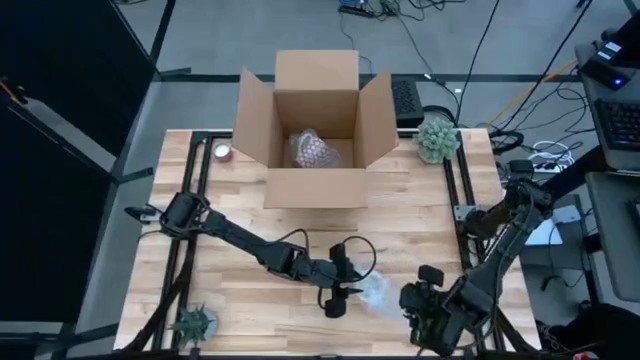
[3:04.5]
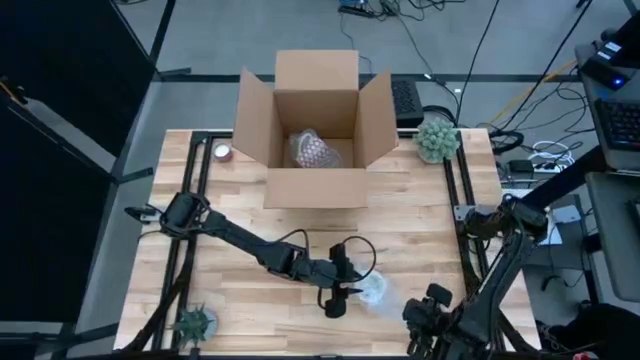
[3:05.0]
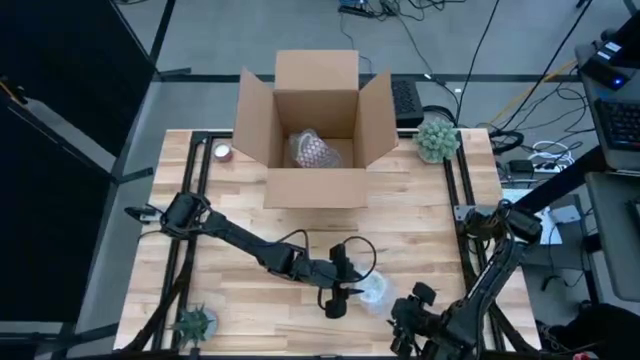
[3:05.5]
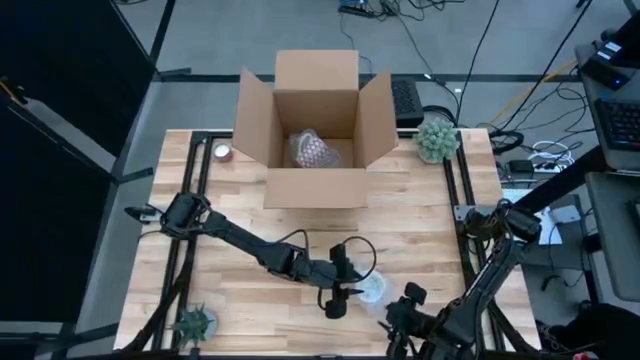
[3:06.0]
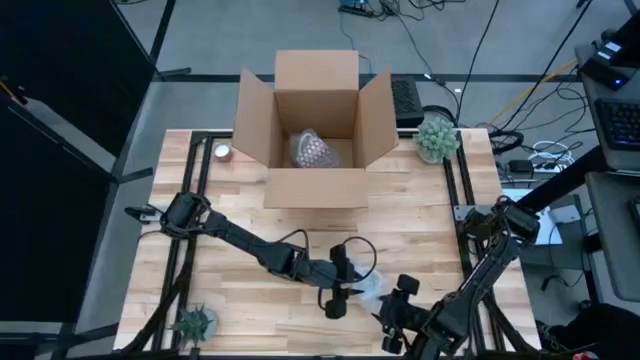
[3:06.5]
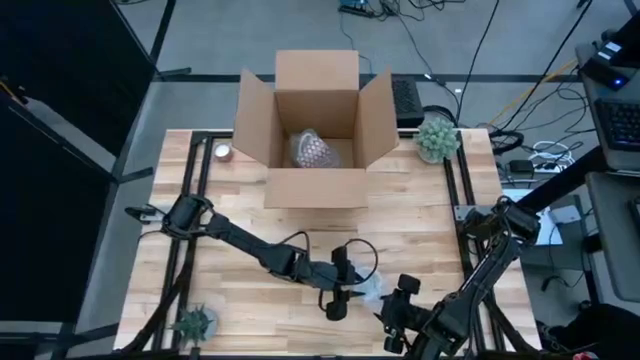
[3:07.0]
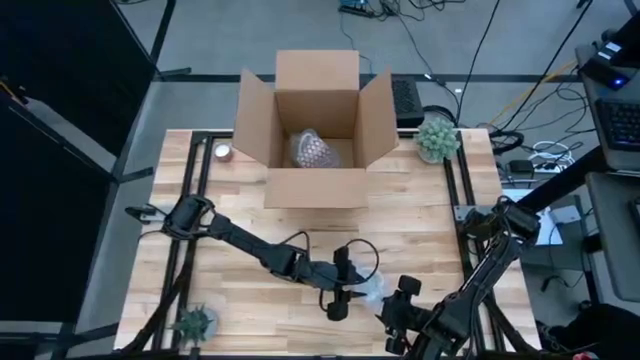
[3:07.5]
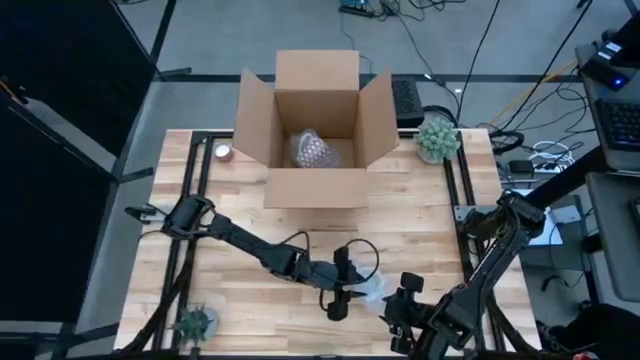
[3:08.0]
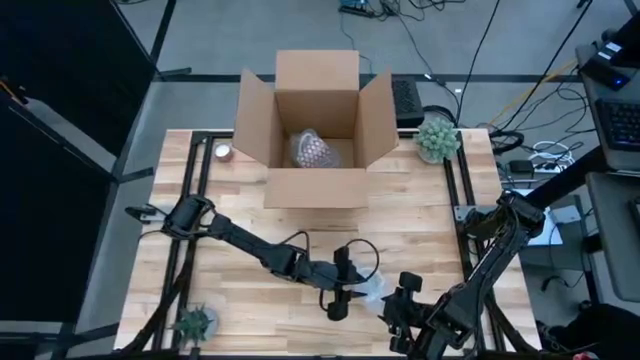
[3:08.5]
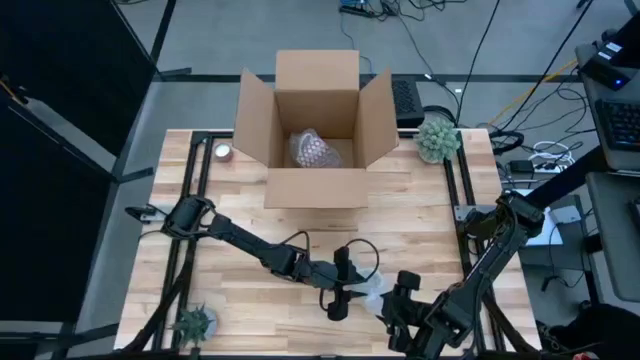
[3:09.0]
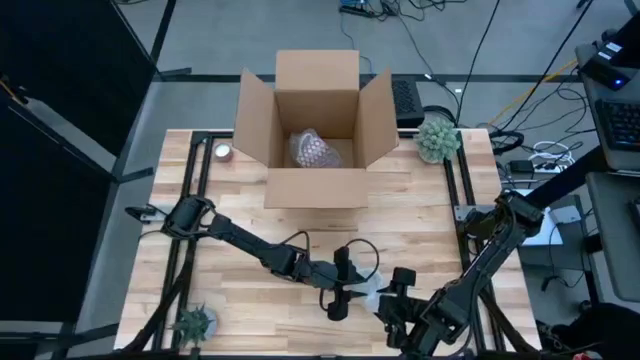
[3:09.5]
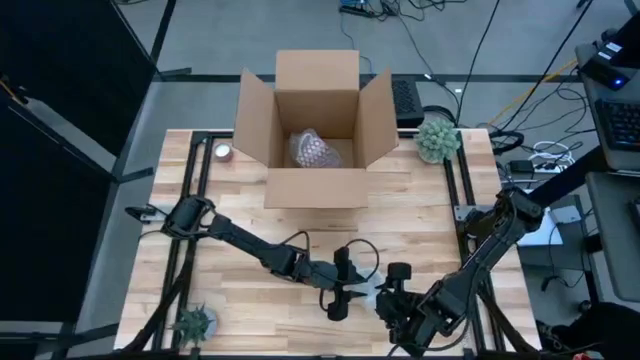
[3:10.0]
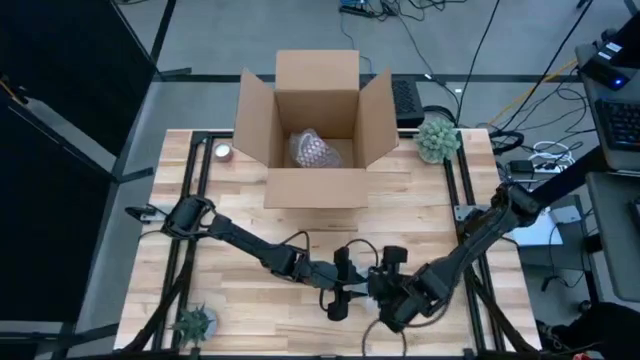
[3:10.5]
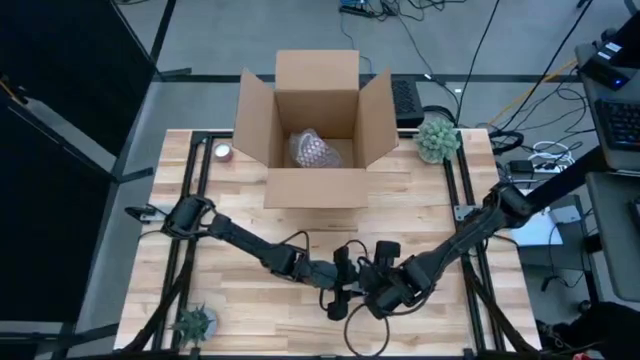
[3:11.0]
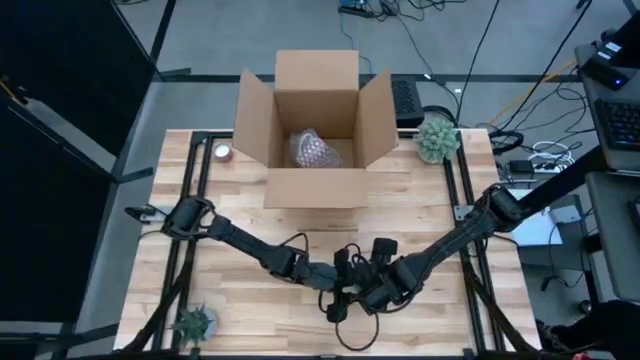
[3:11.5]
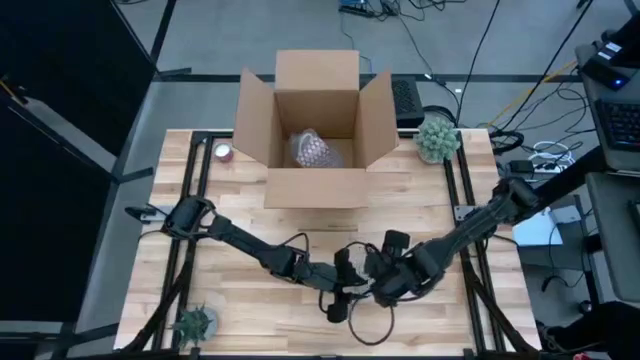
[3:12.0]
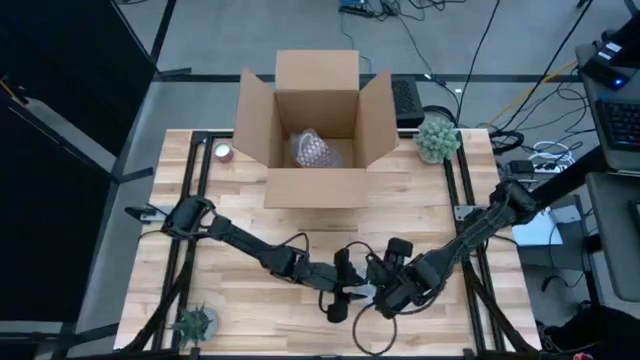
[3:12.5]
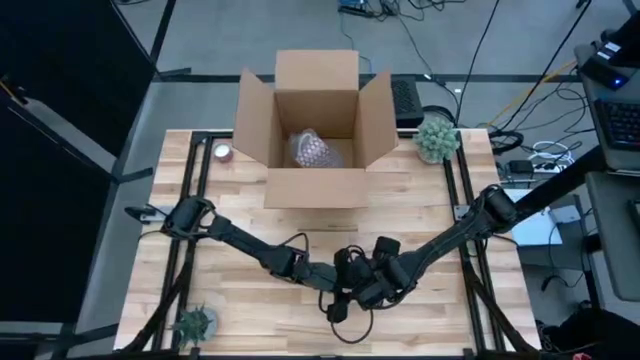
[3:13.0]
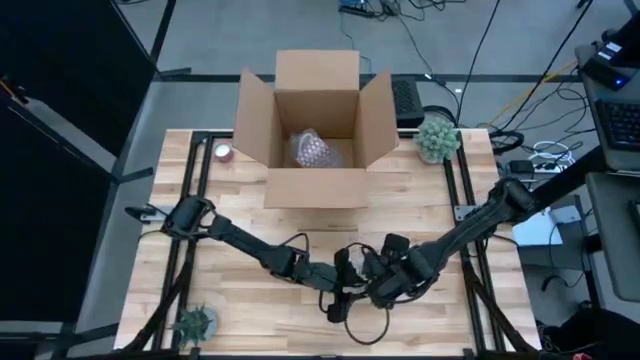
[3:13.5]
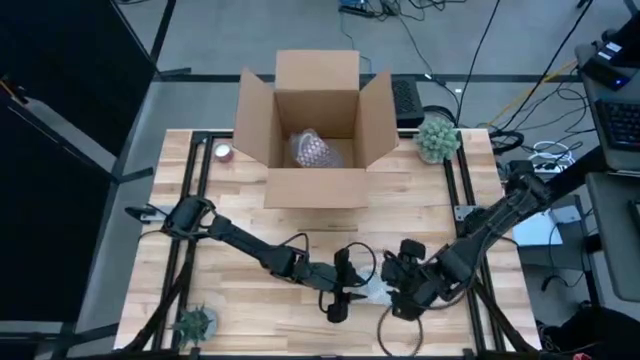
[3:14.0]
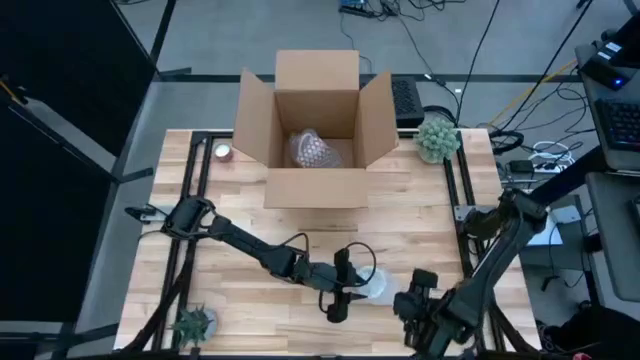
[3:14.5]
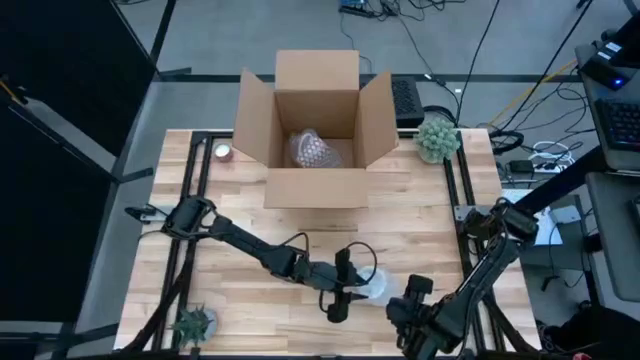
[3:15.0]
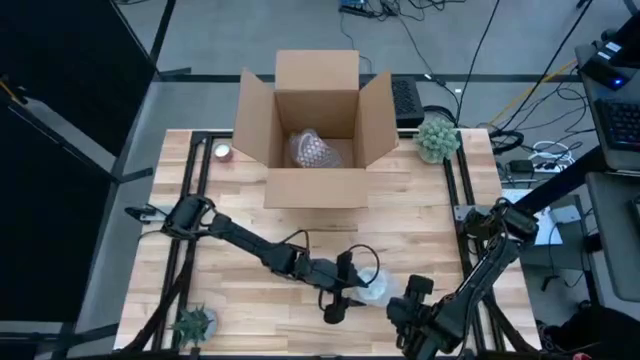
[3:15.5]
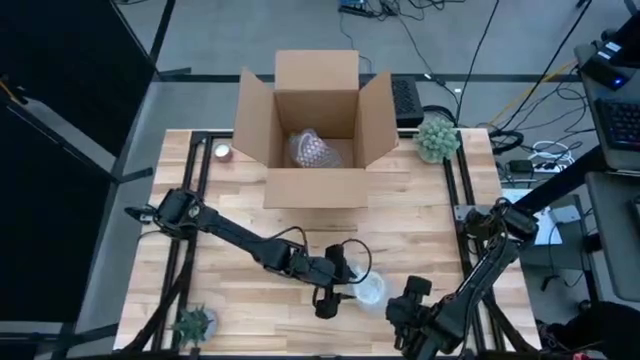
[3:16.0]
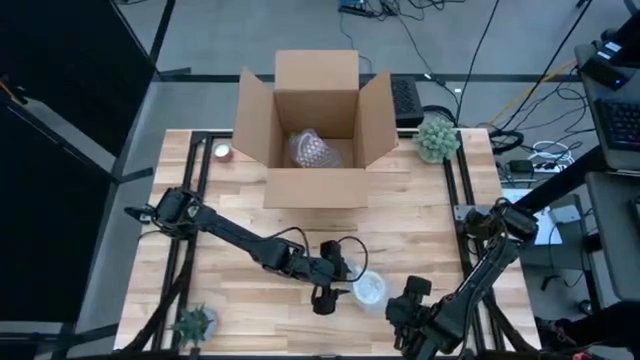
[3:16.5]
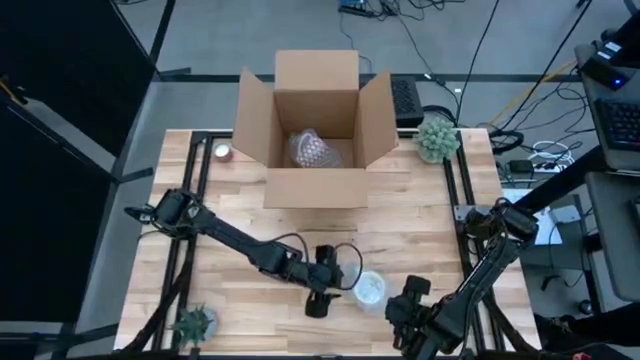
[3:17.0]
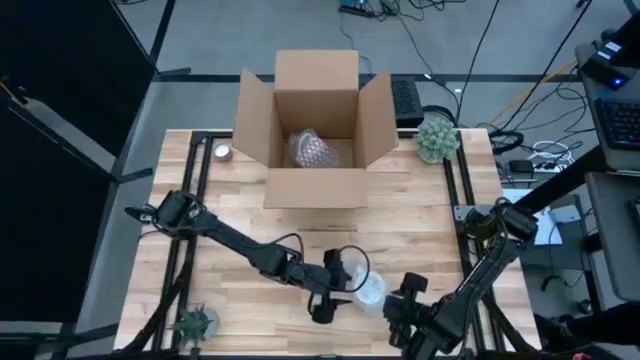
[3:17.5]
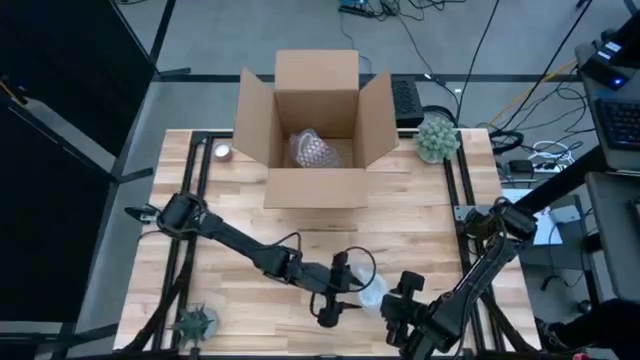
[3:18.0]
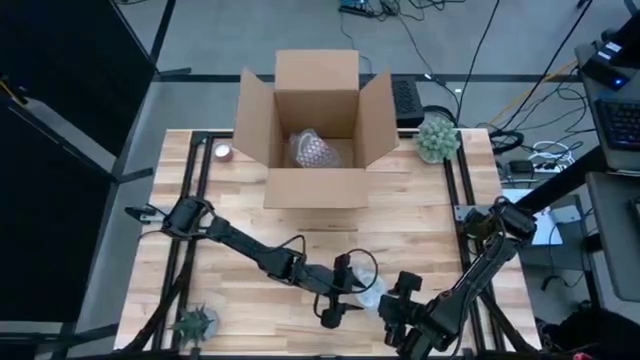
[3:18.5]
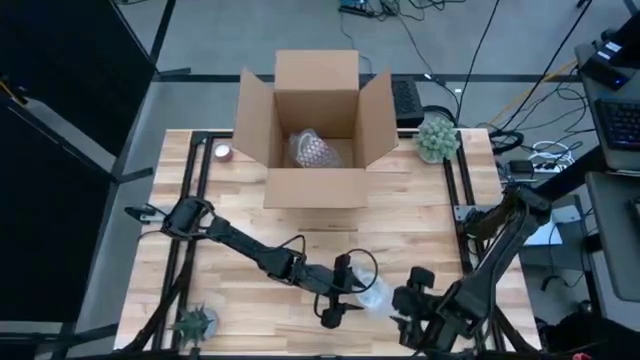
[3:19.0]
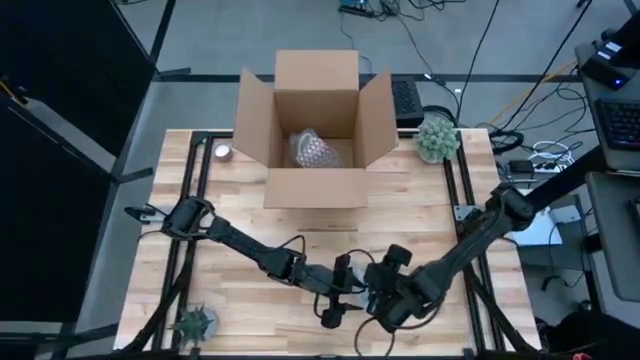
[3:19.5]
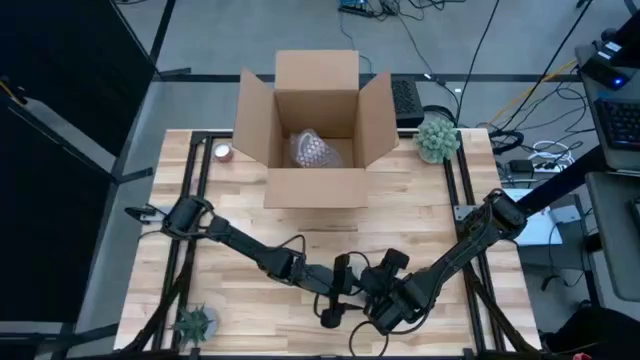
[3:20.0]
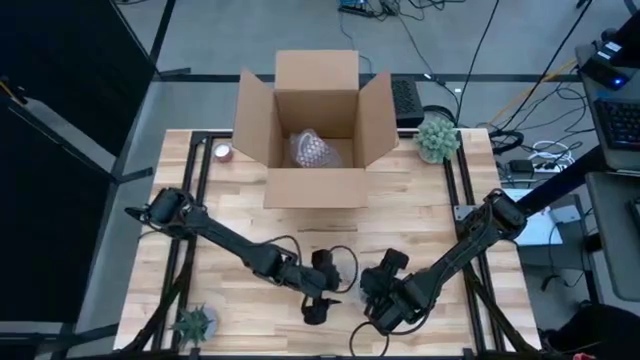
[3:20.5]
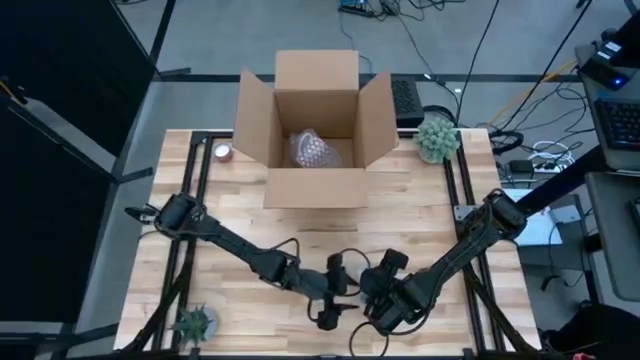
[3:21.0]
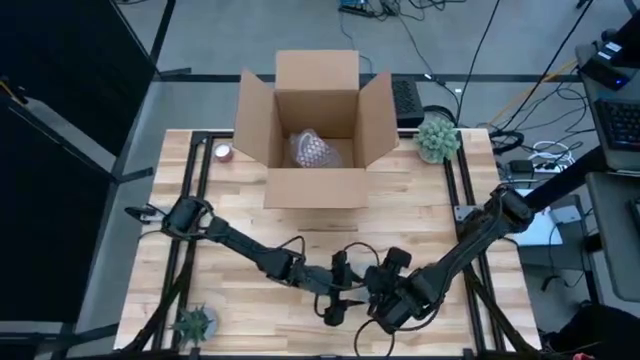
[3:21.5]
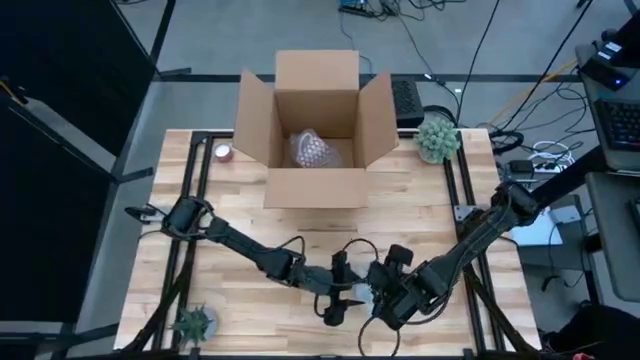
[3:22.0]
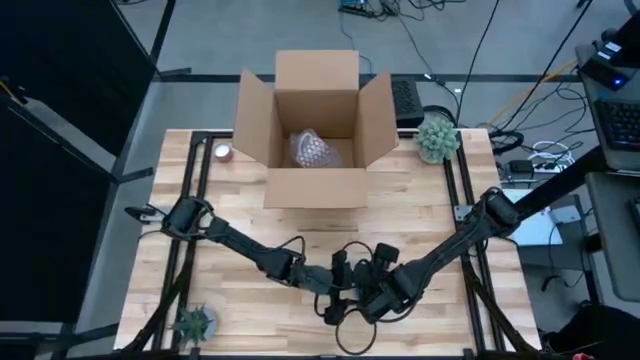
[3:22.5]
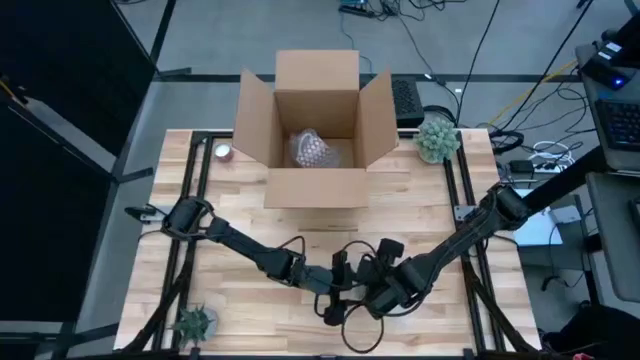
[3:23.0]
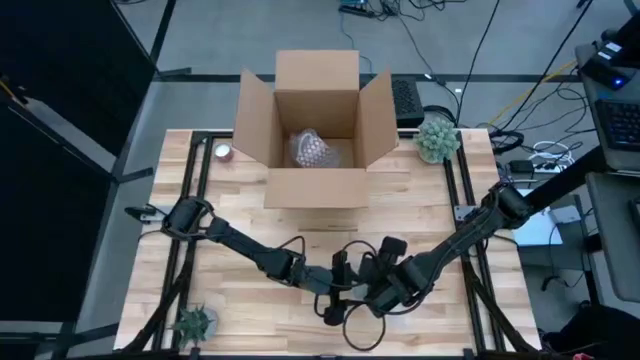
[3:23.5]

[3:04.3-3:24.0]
Task: wrap mug
Wrap the yellow mug with the bubble wrap

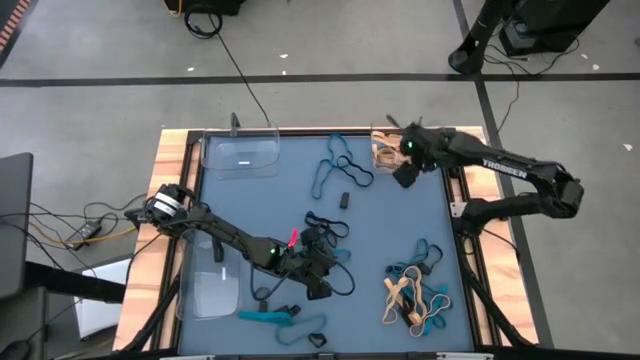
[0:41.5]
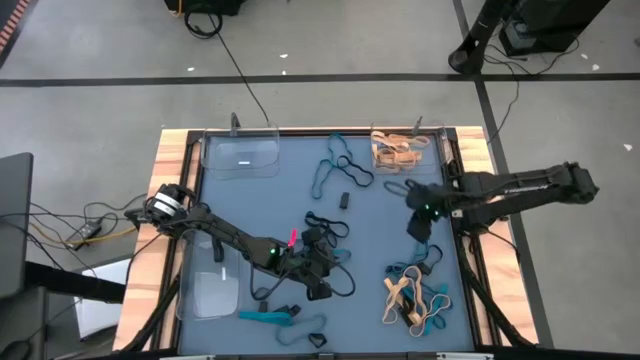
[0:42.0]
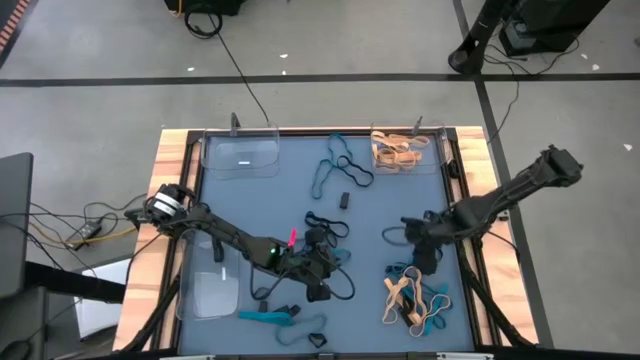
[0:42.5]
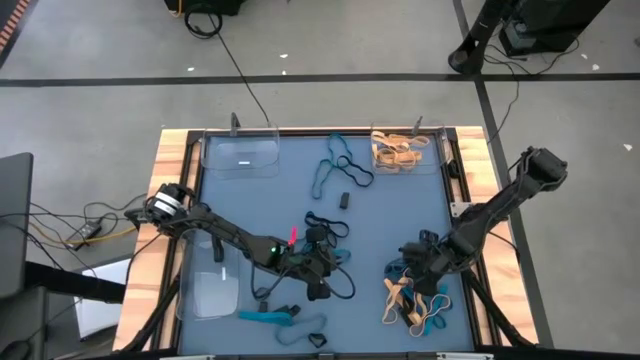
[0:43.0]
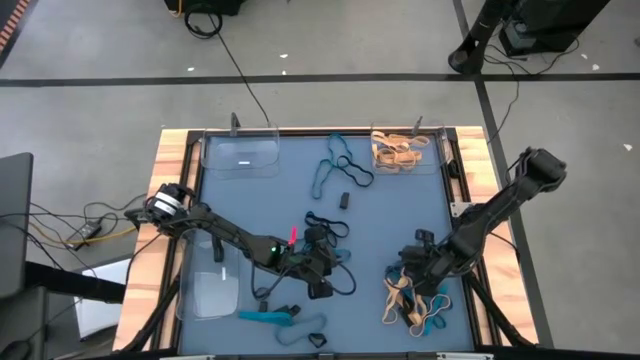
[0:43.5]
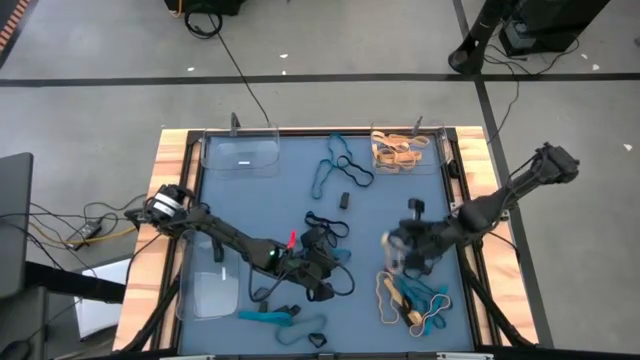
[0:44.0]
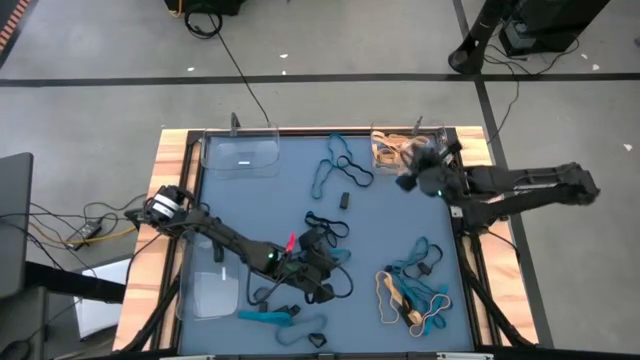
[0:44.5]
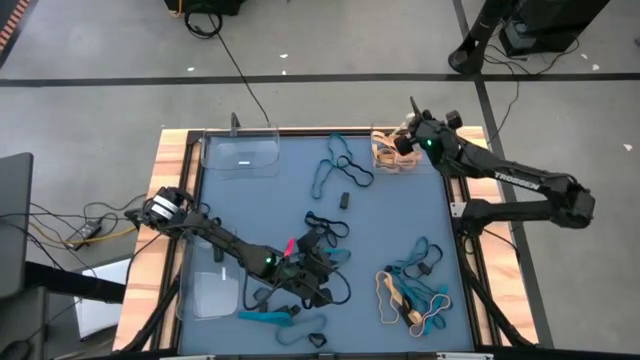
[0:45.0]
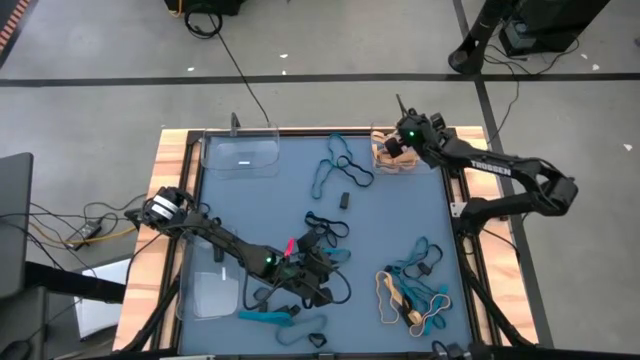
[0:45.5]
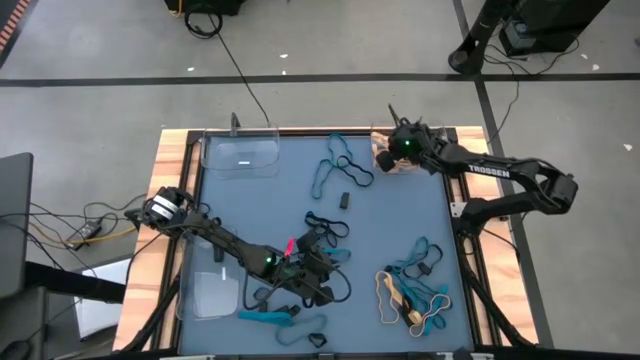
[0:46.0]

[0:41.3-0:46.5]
Task: Sort rubber bands into baskets
Put the yellow rubber band into the top right transparent bin
